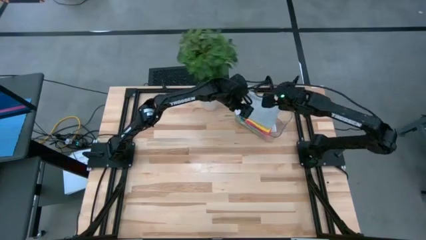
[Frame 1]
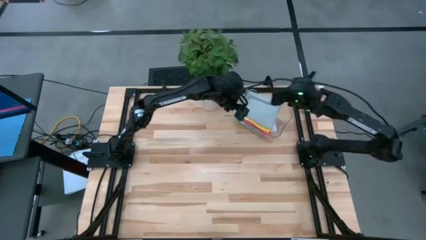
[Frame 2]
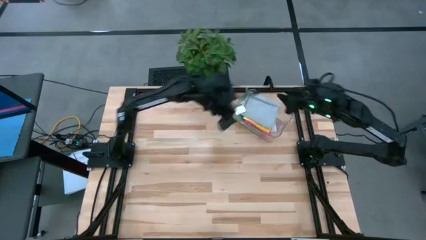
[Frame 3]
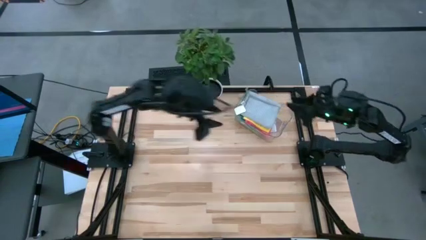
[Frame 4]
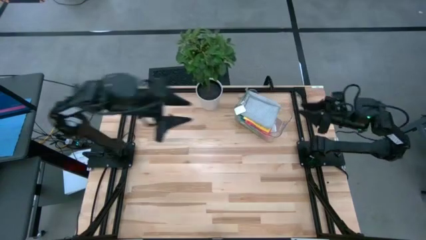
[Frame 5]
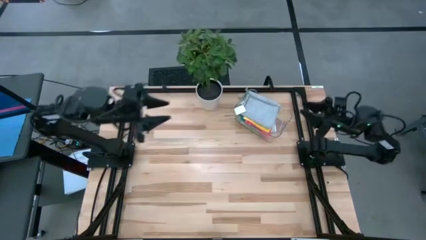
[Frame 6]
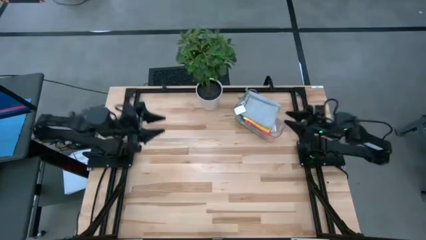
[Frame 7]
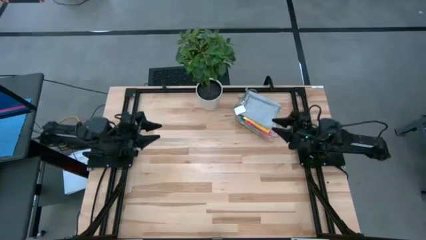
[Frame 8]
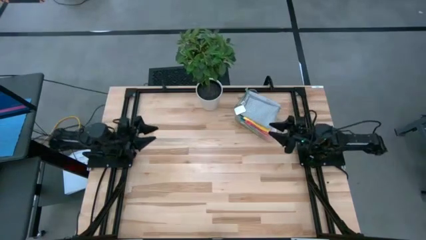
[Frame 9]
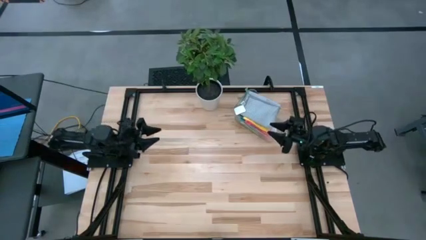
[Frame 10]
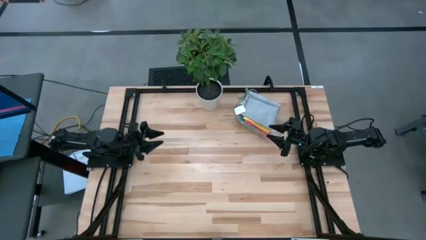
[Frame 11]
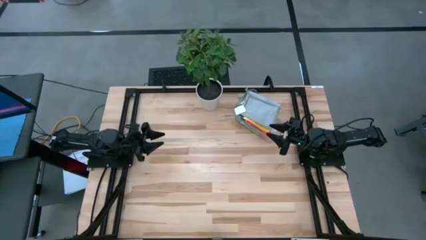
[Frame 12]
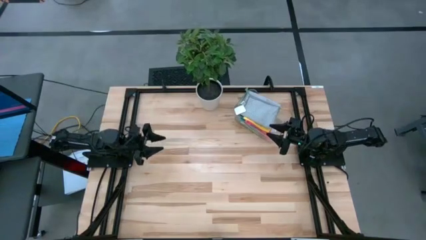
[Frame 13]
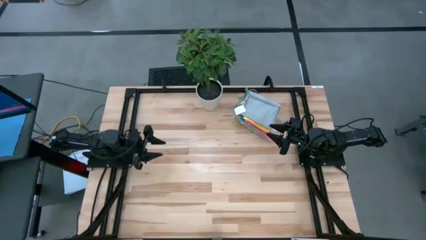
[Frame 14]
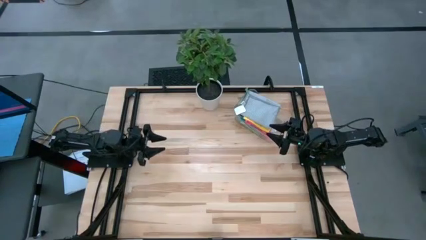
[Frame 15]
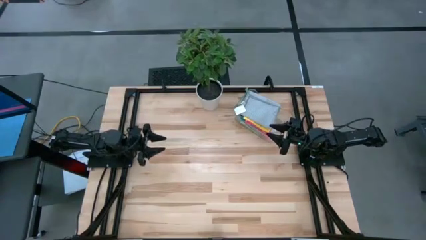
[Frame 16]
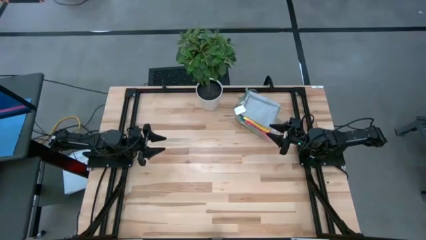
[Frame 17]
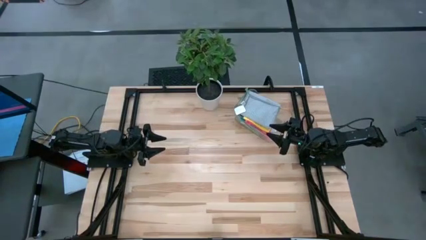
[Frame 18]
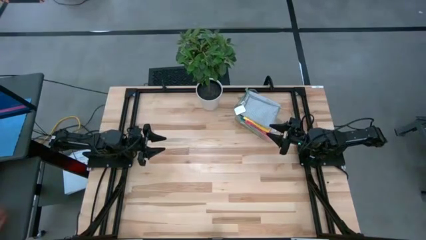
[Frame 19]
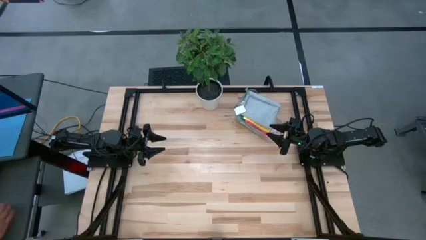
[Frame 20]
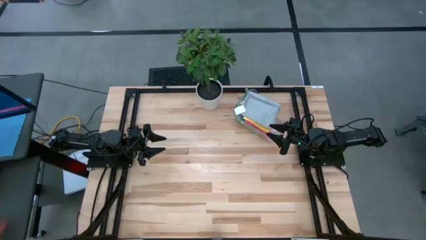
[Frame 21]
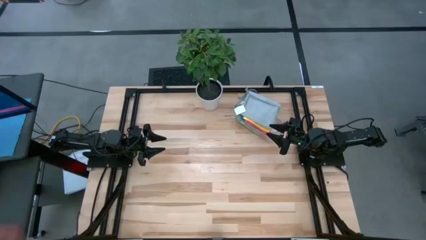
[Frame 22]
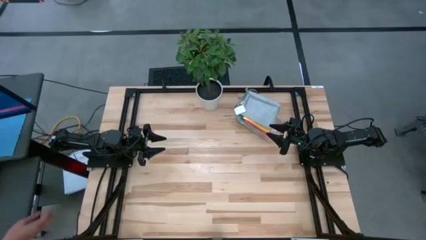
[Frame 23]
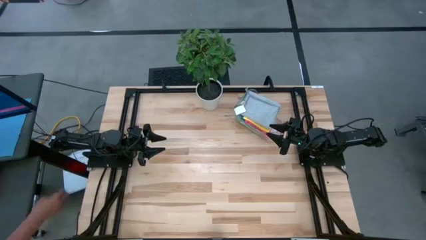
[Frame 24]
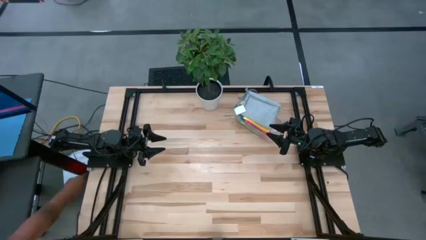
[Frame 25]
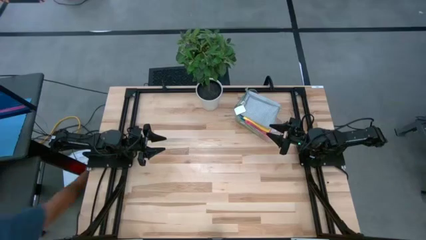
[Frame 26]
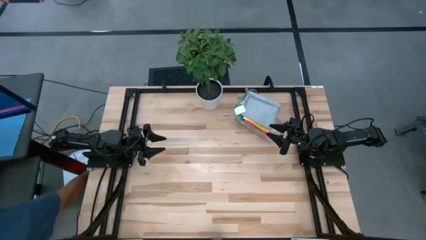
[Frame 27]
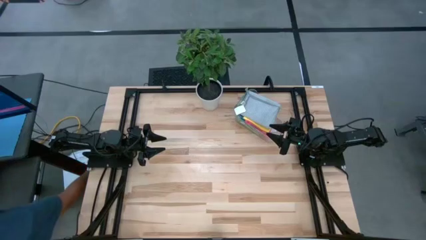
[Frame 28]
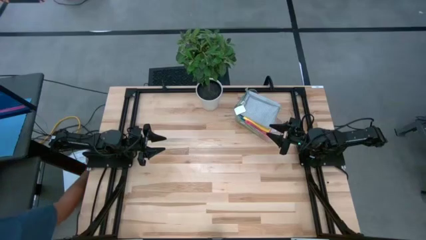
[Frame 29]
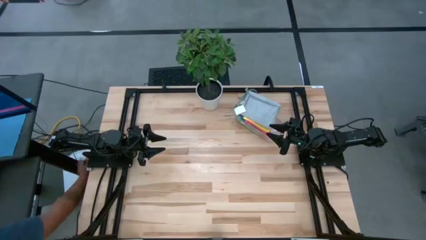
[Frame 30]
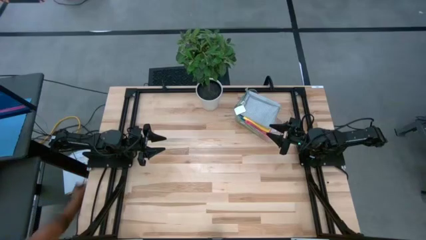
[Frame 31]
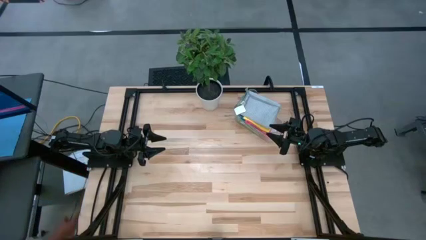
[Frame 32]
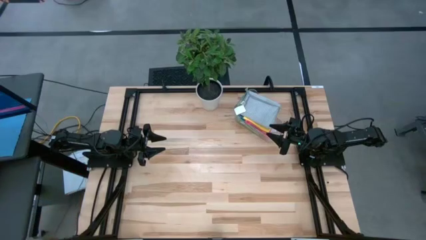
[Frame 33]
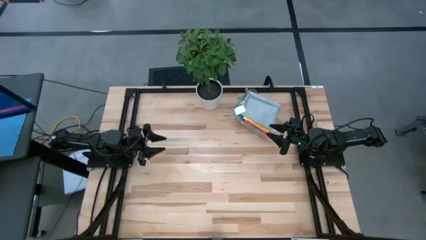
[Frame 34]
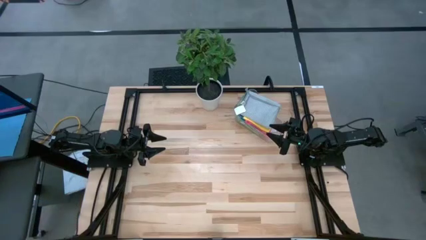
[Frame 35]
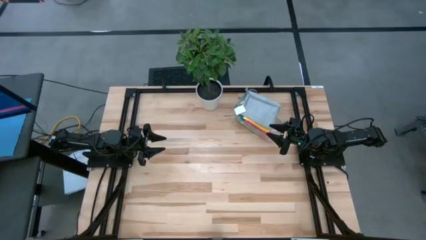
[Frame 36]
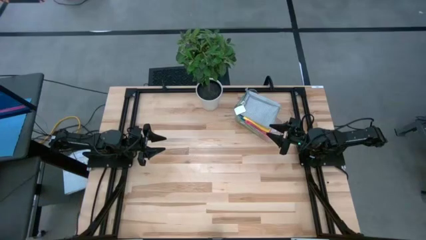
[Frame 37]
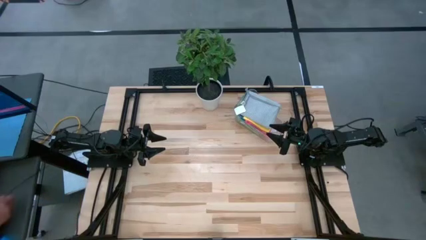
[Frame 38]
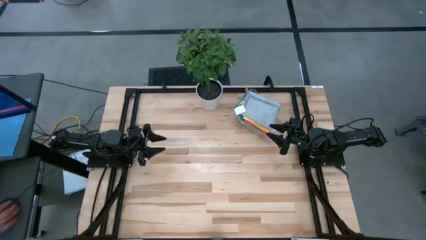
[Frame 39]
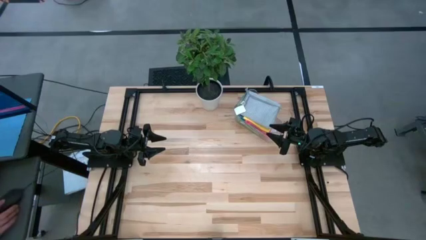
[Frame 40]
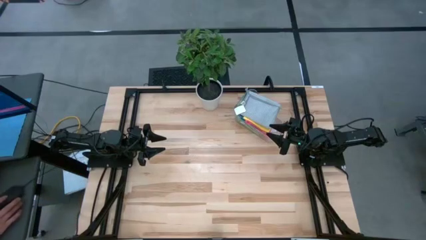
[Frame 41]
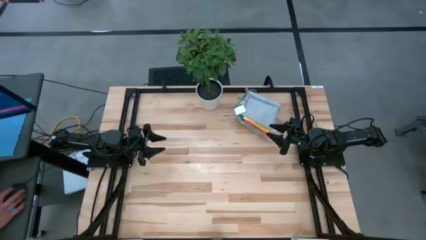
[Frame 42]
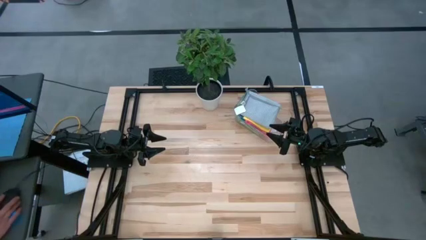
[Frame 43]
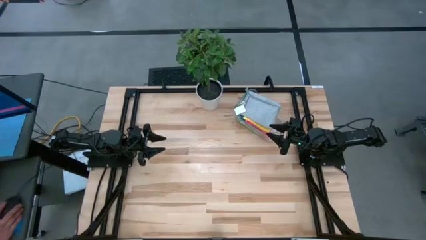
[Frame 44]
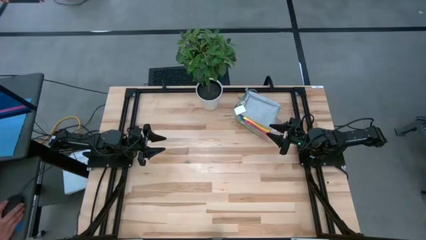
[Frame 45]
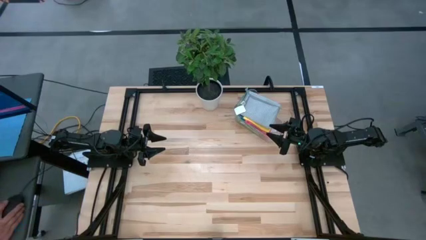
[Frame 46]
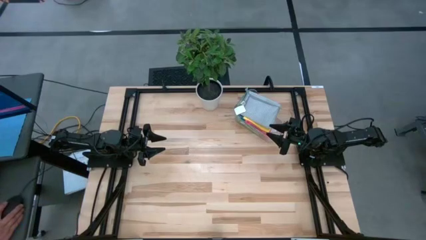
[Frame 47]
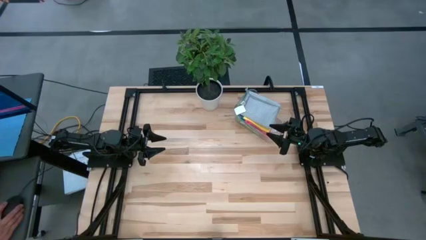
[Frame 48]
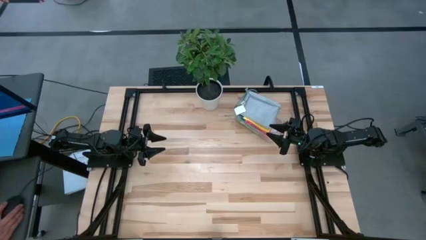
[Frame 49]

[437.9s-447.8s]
Task: Fold microfiber towels
Return to Home Position

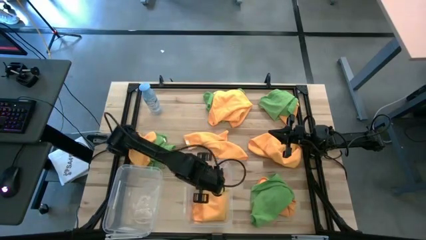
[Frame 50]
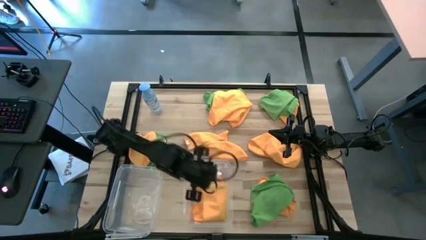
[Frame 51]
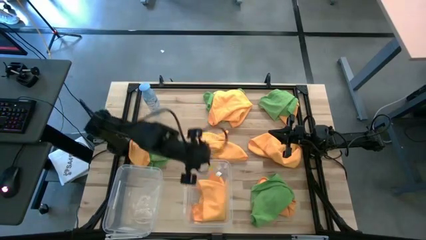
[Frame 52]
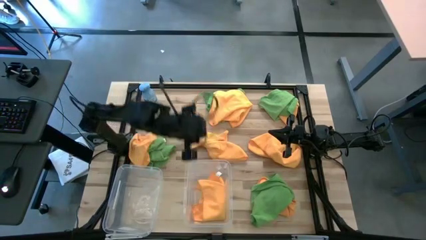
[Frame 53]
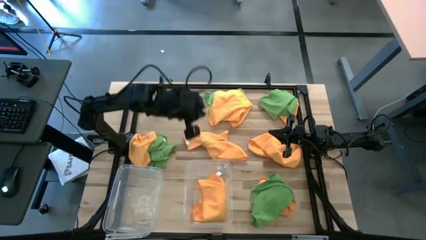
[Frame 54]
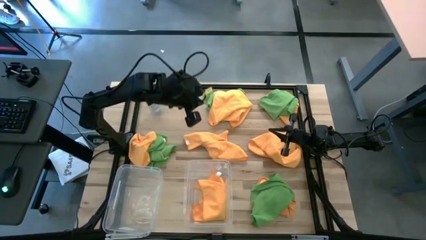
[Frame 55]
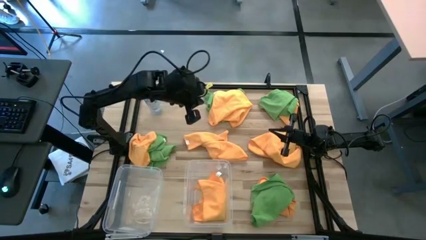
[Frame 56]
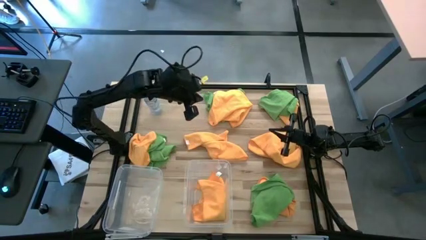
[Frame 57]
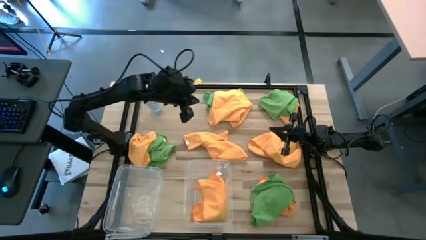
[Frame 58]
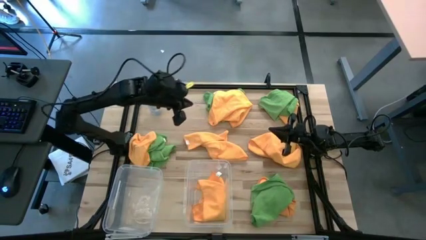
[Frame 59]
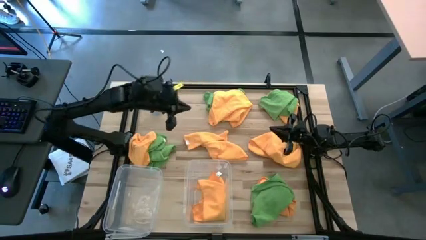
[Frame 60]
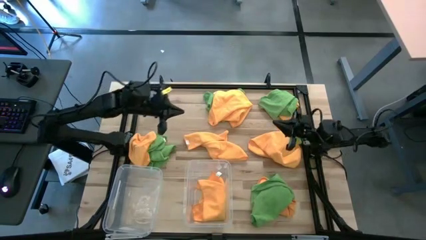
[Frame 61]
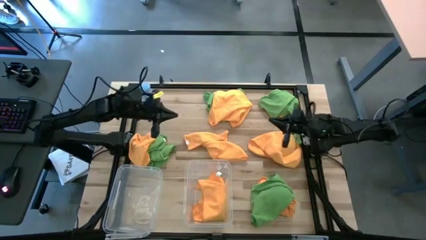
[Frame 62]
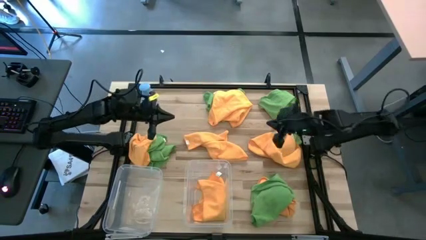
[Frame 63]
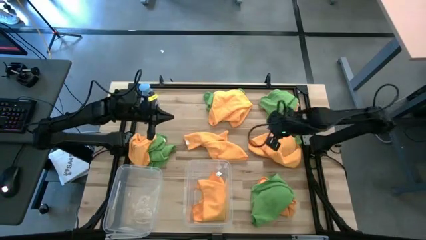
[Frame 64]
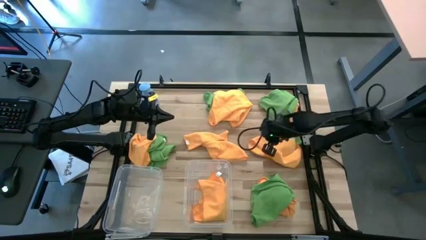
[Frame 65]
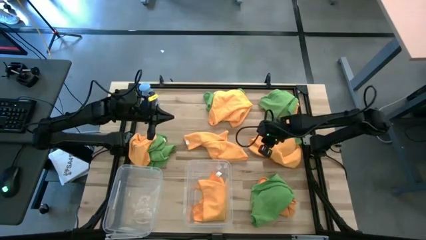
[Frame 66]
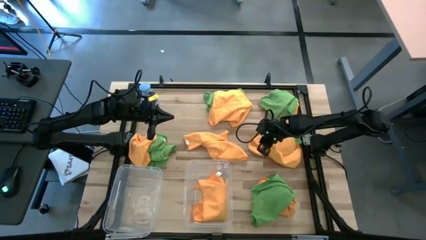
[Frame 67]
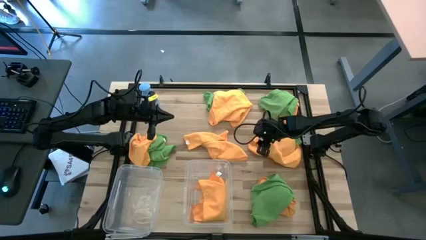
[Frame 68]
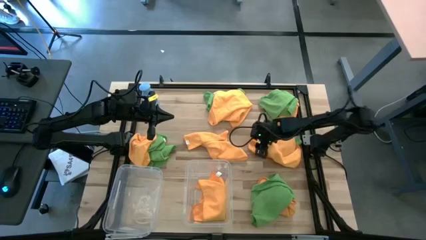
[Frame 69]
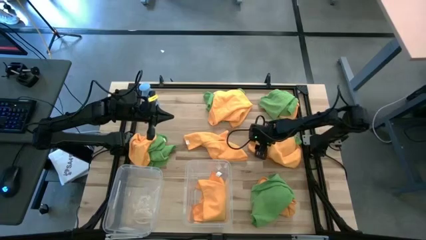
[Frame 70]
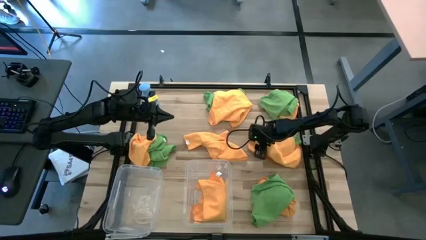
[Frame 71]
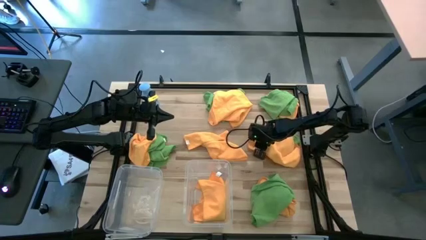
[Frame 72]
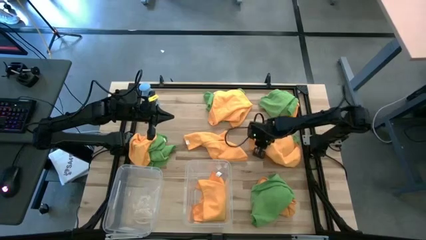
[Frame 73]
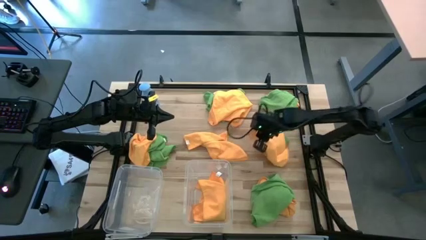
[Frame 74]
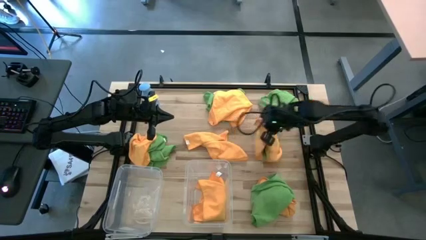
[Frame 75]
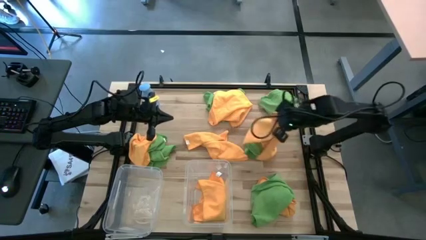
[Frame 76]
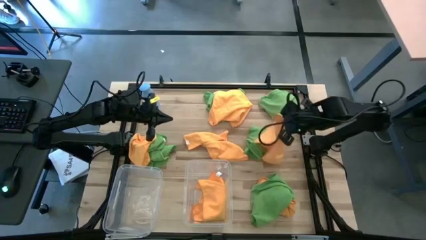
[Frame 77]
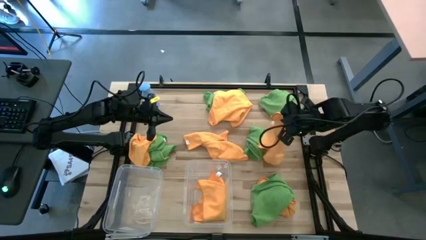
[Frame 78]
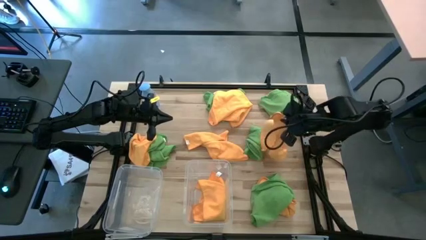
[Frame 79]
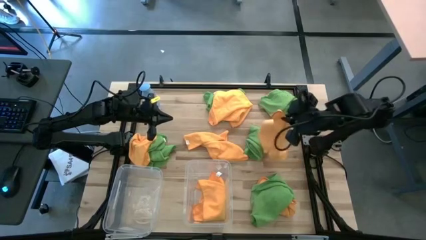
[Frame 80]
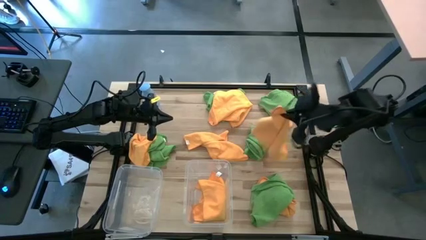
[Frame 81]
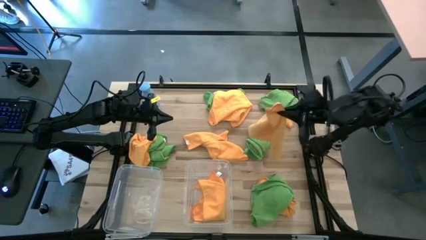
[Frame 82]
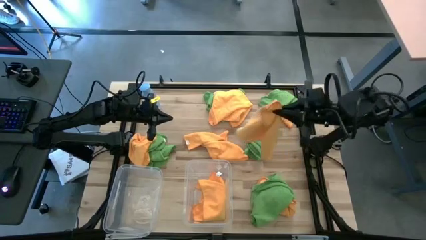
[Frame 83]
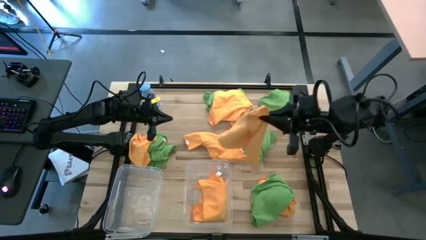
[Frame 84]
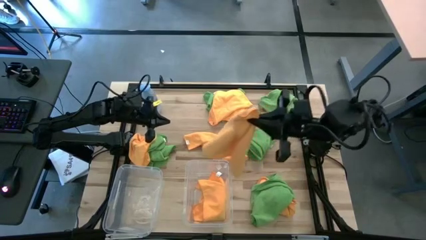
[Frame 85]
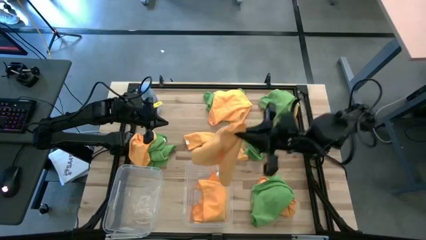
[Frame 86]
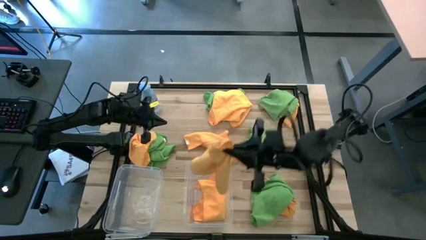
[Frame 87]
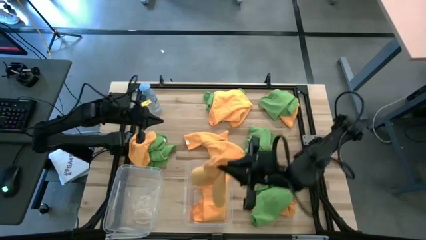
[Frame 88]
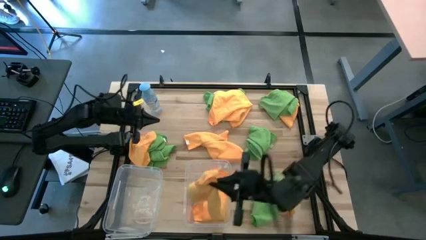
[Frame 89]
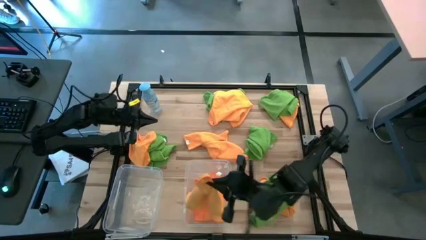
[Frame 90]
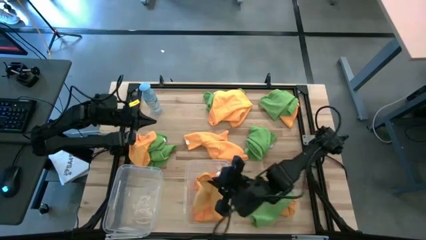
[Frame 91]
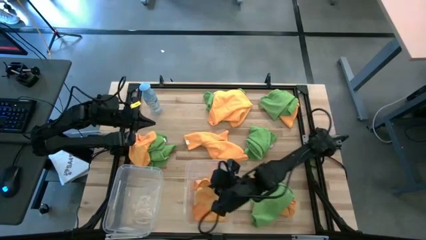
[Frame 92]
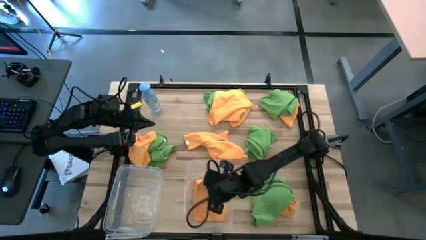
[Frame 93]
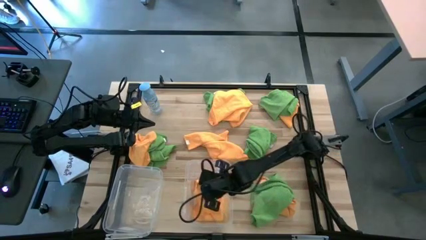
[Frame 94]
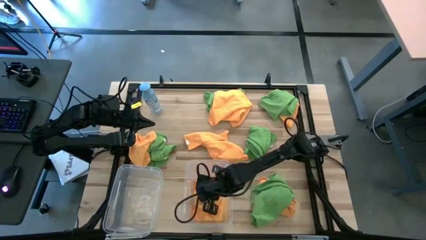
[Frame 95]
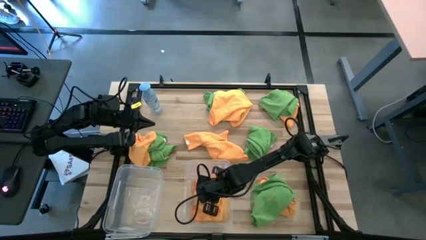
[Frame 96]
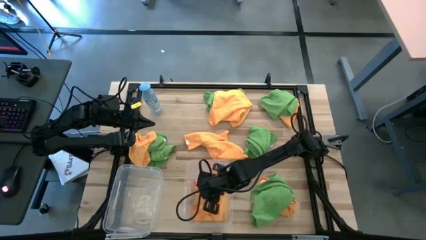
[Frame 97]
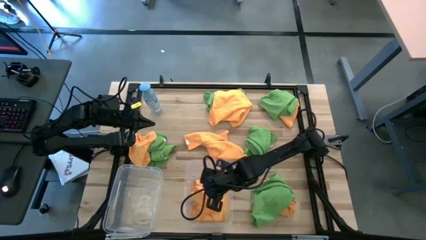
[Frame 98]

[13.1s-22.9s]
Task: Sort microfiber towel by color & place in baskets
Put the orange towel into the right transparent bin
